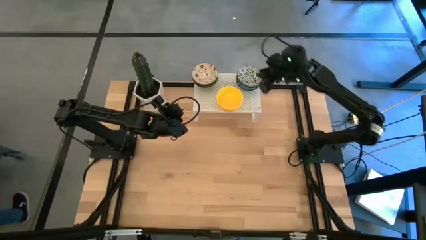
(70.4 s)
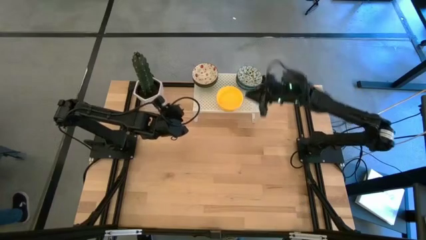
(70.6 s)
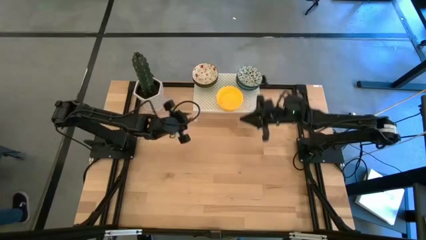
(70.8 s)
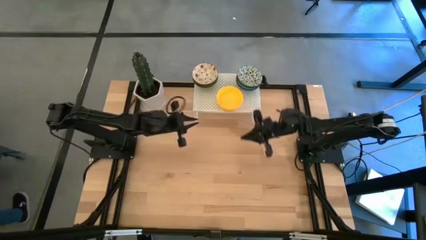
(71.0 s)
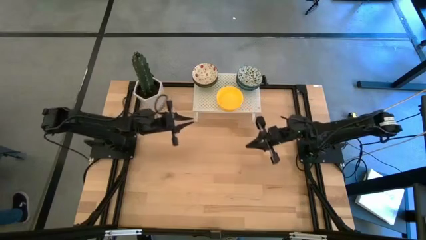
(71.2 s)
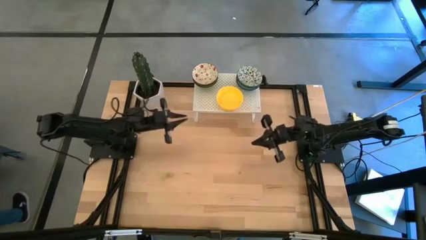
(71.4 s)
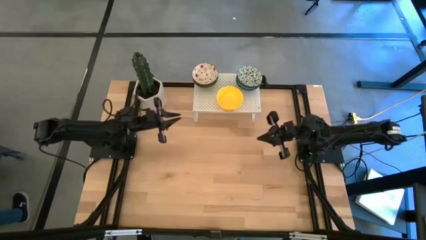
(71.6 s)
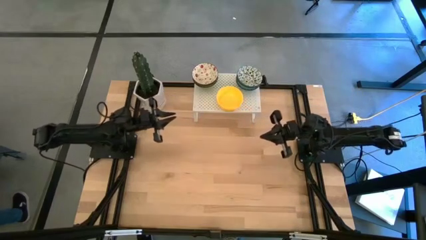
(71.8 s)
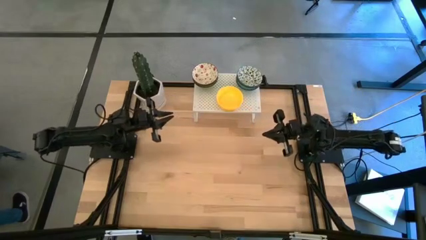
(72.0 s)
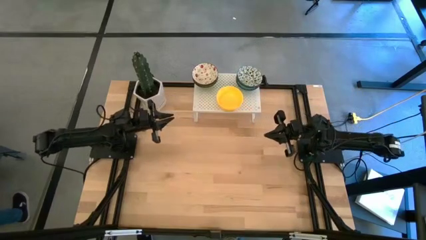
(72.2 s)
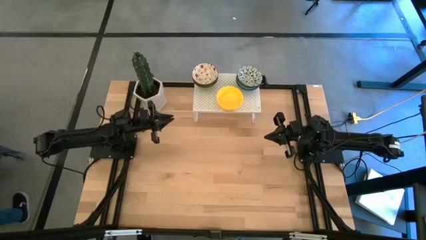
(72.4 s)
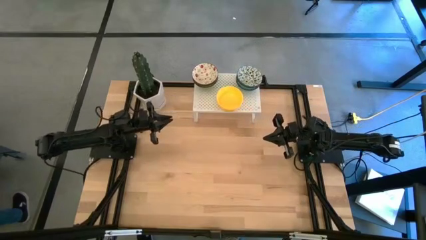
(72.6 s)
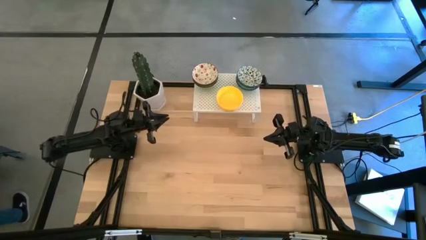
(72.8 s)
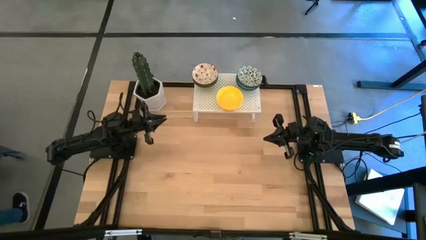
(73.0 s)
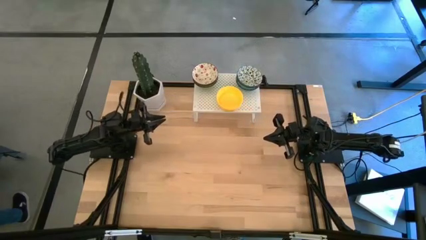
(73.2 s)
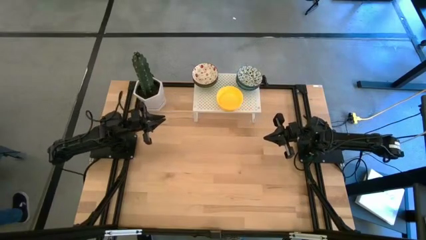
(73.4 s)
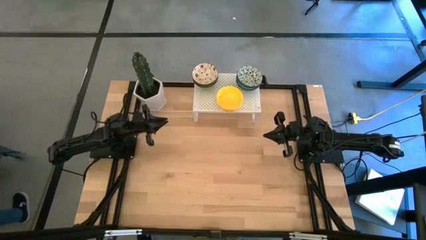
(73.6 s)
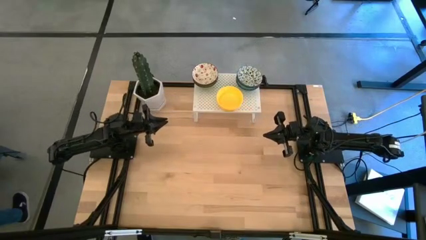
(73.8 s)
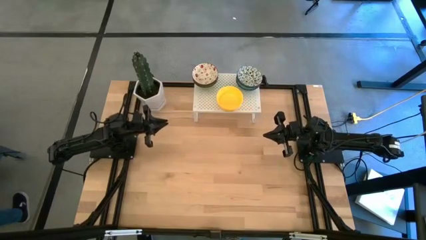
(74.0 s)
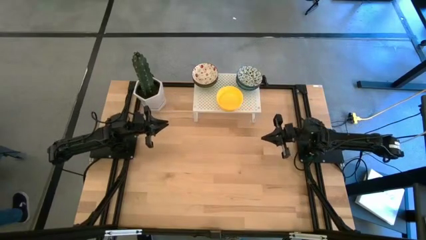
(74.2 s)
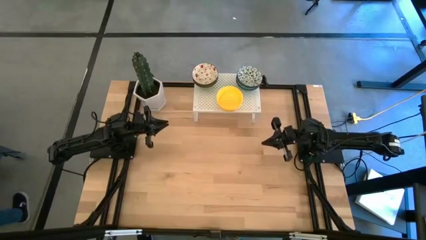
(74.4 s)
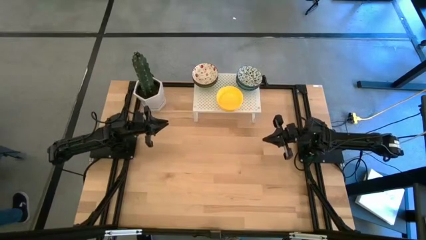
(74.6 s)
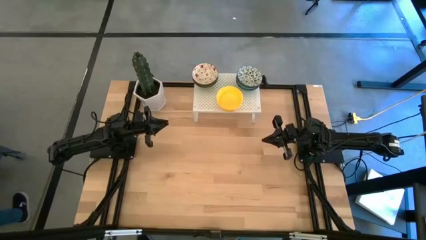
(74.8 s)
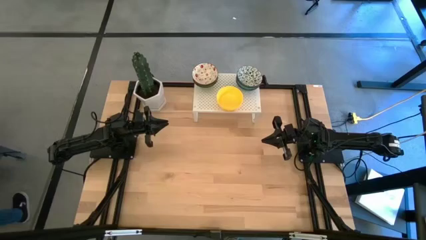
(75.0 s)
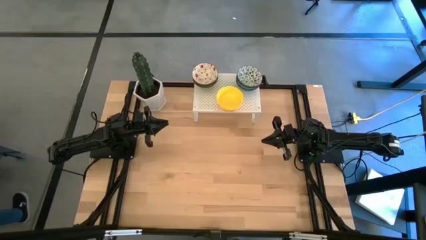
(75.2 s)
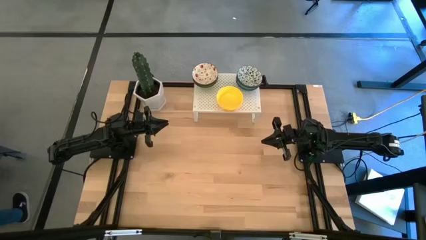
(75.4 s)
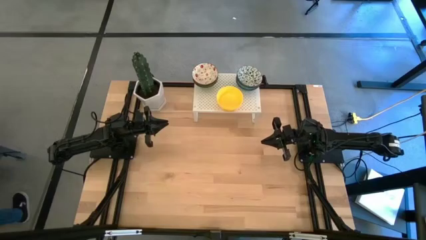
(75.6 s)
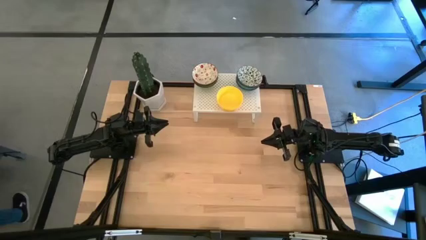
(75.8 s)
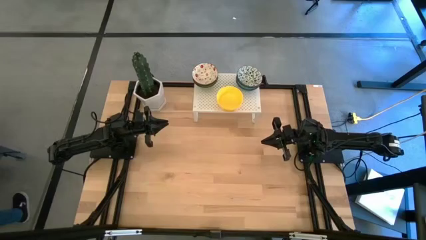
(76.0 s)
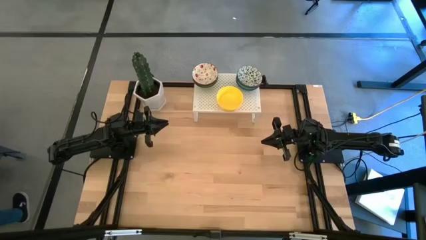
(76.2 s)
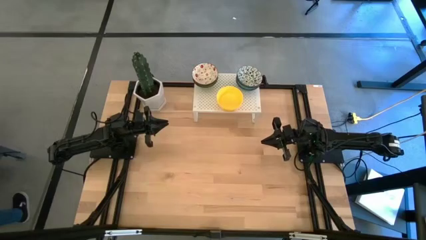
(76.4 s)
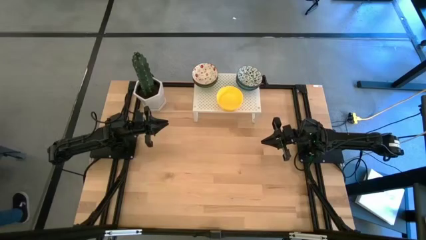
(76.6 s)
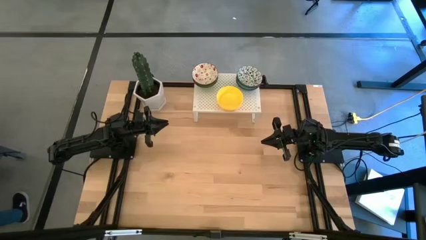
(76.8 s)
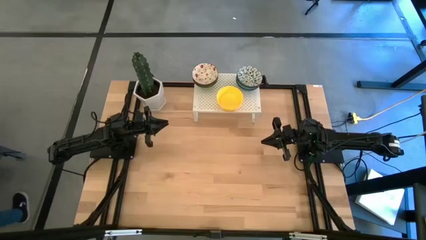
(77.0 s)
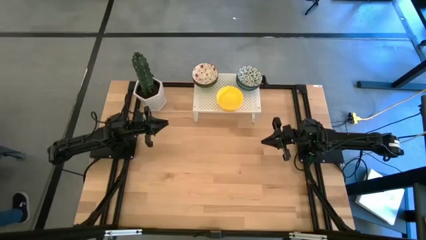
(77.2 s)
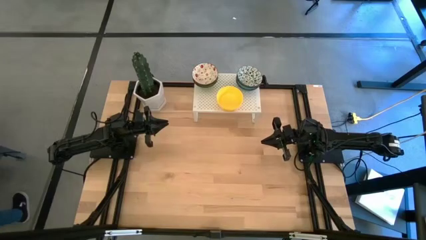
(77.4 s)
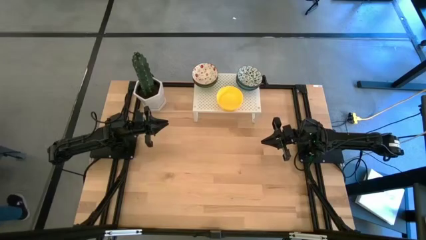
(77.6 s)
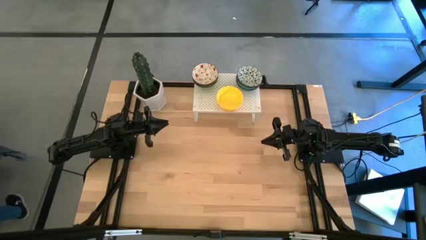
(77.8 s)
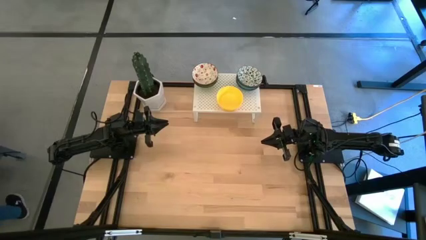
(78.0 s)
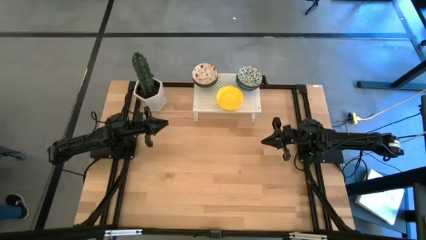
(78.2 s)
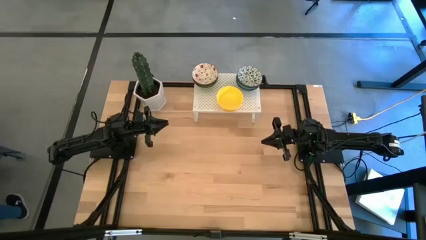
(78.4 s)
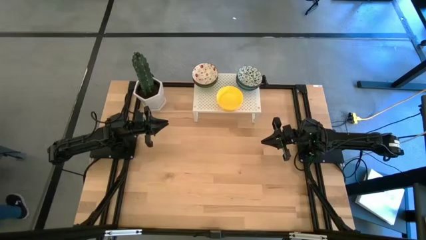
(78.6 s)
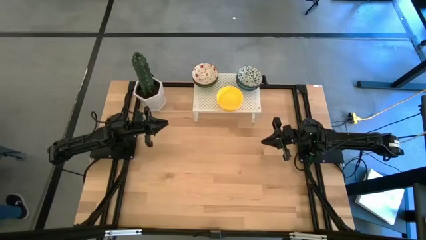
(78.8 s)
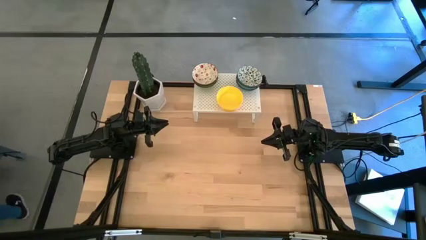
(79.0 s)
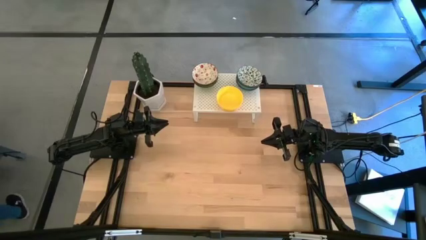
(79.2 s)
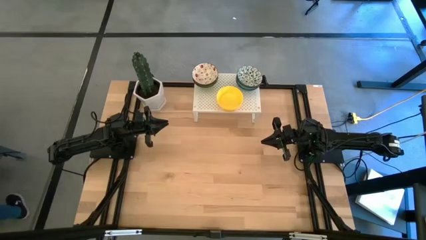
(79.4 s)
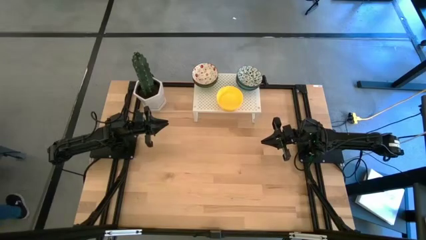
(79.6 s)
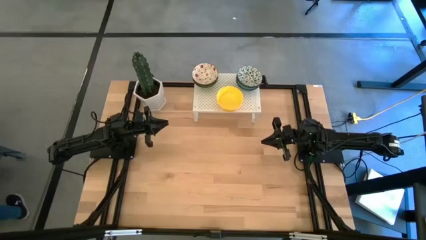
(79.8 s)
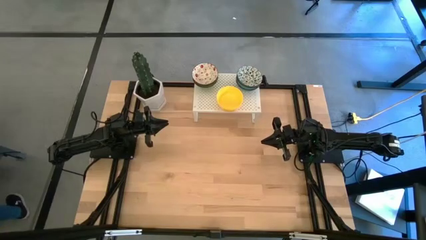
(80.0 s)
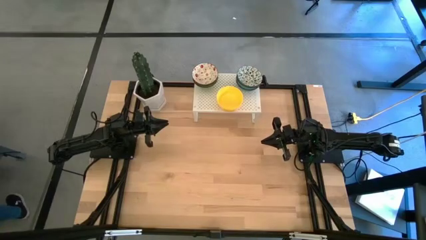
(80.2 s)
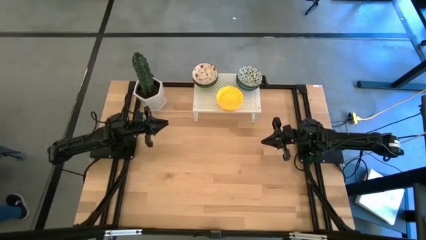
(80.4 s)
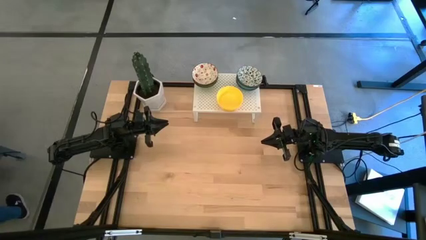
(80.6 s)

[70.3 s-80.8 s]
Task: Pick & Place Mini bowls
Return to Home Position

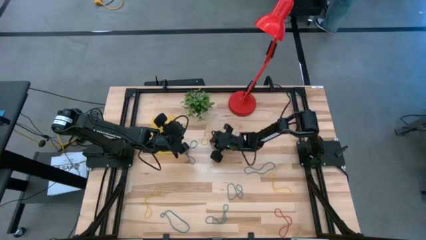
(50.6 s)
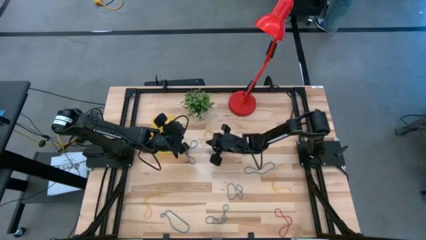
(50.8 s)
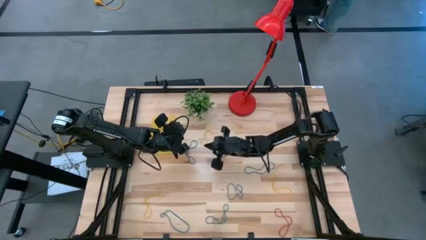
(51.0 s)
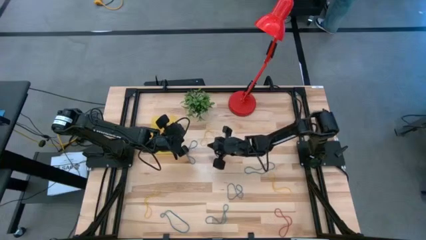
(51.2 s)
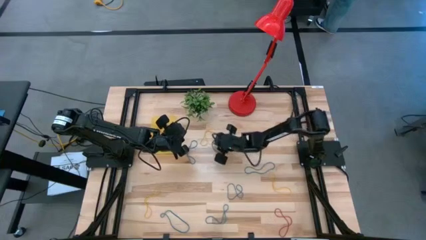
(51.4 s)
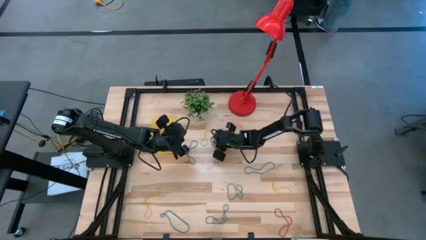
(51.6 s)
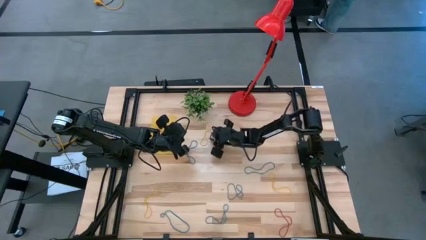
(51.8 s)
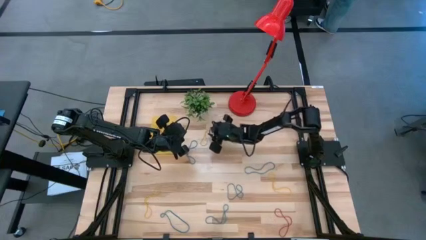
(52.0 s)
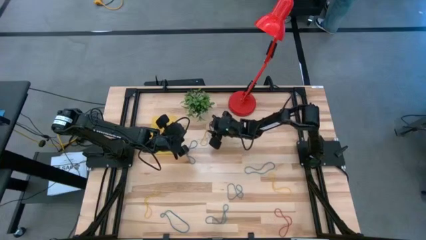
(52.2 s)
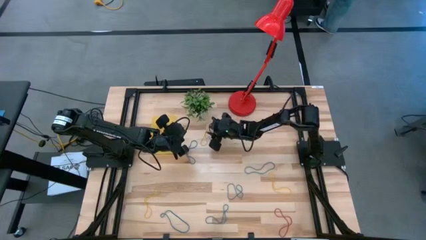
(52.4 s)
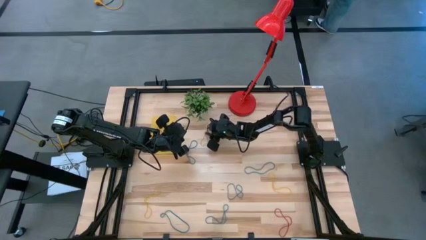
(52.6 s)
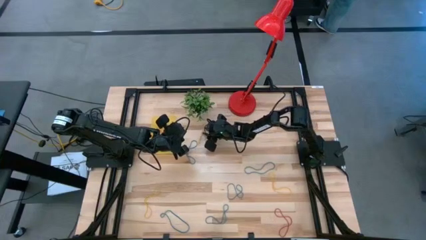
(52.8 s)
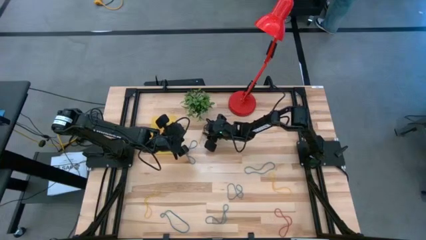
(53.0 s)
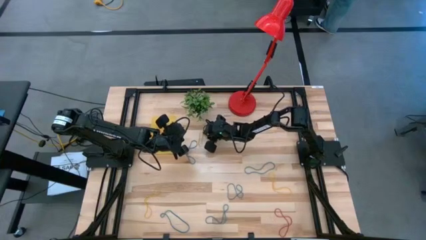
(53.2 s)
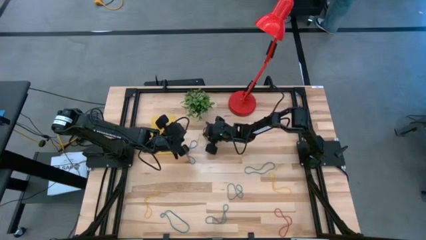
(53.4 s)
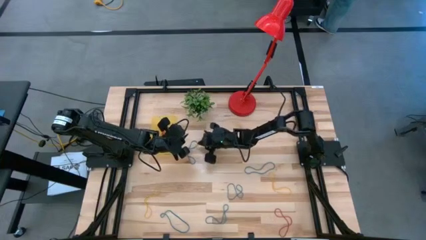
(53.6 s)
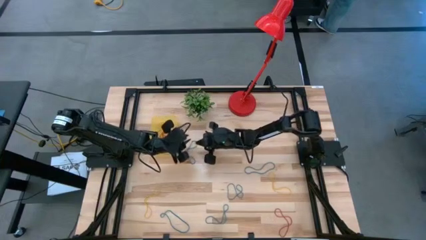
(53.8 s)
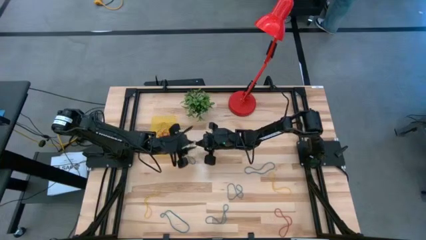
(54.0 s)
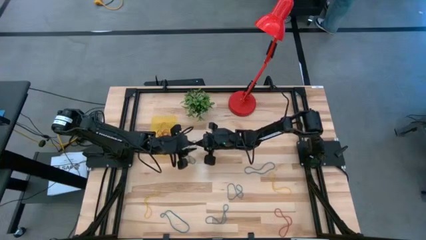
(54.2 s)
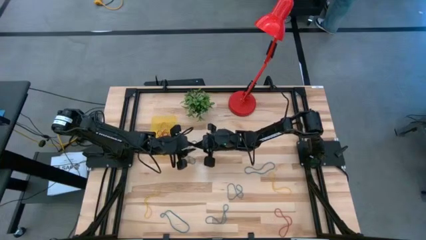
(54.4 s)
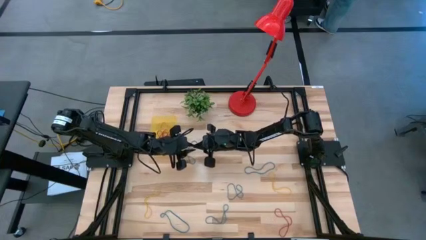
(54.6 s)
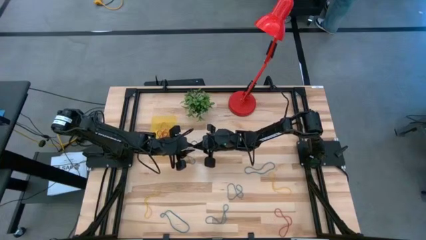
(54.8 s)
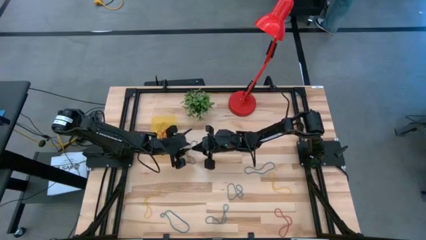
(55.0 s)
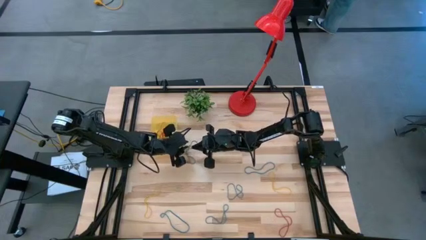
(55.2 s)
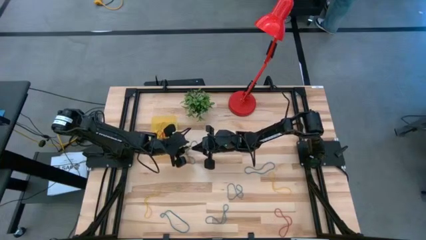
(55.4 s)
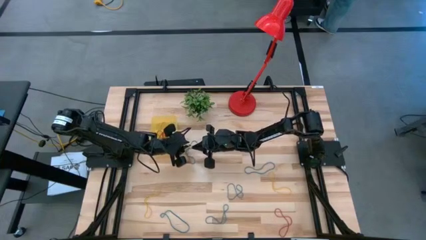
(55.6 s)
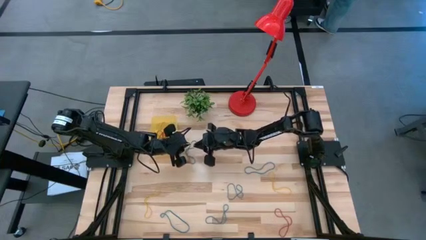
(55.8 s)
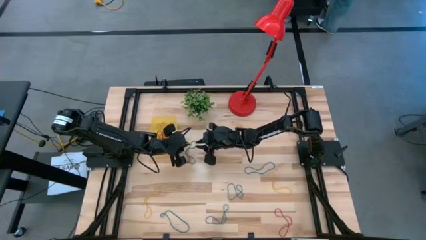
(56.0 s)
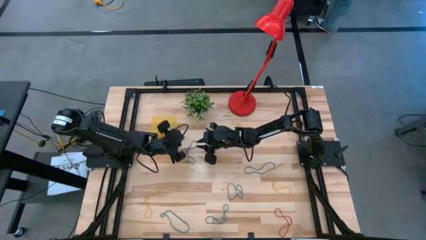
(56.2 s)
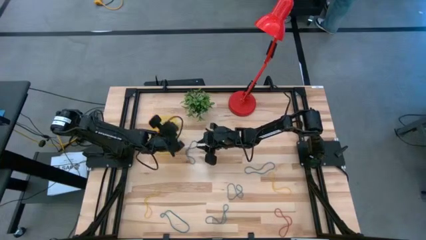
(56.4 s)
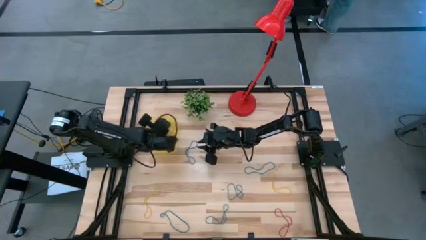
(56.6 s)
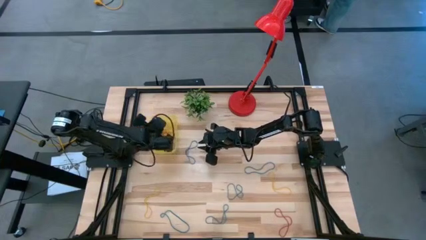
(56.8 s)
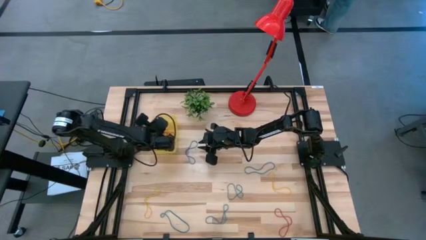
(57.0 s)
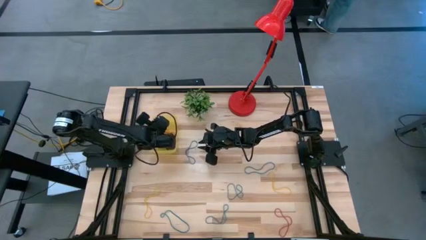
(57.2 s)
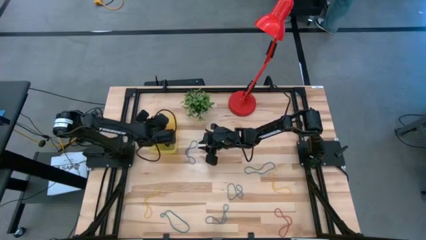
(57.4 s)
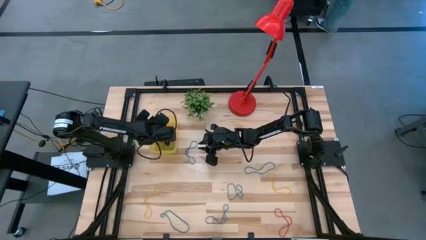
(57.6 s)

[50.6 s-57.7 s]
Task: Pick and place items into bin
Put the yellow rubber band into the yellow bin
